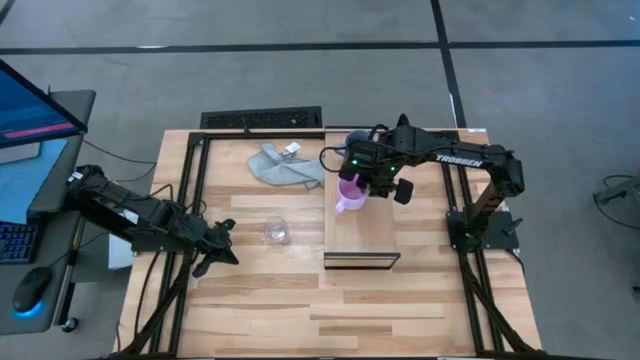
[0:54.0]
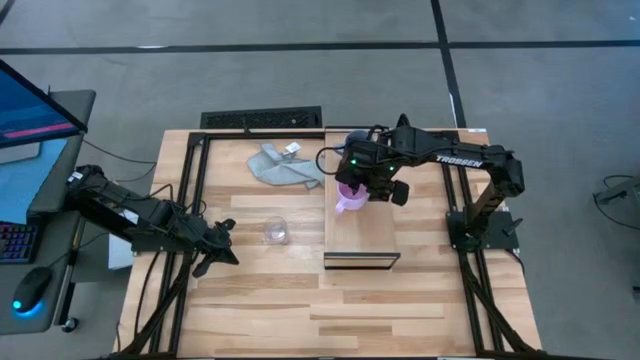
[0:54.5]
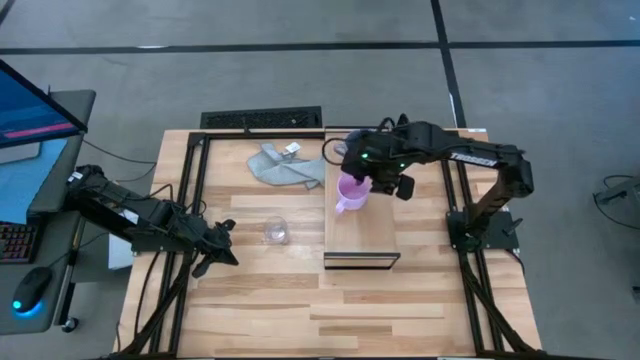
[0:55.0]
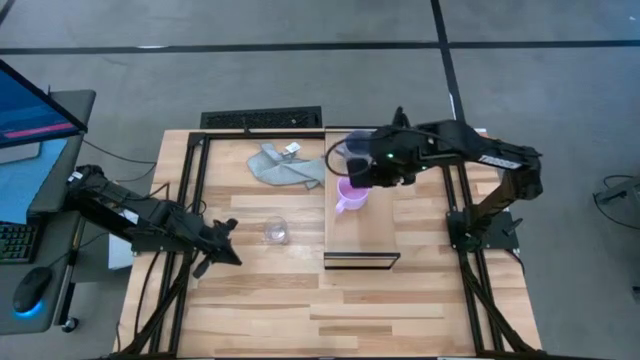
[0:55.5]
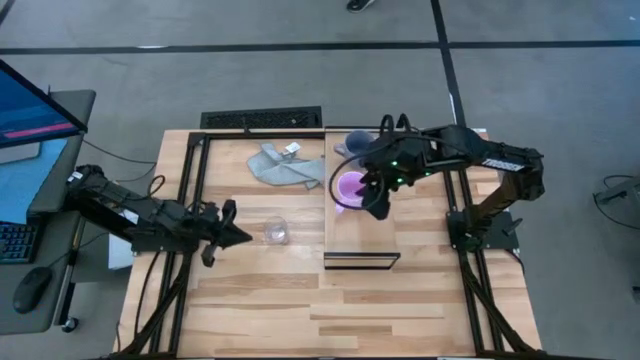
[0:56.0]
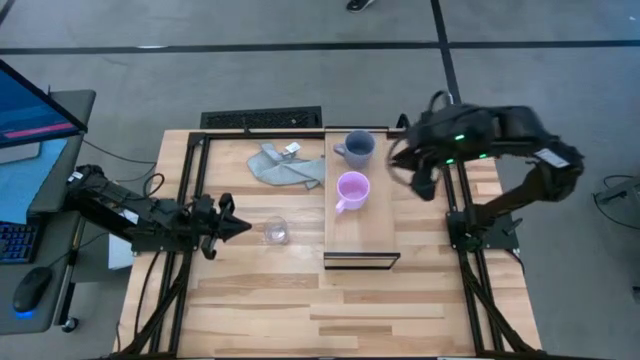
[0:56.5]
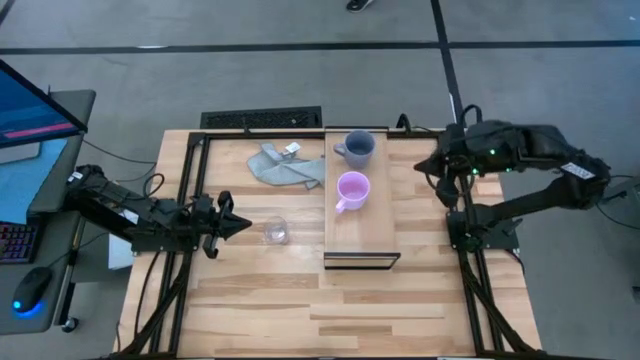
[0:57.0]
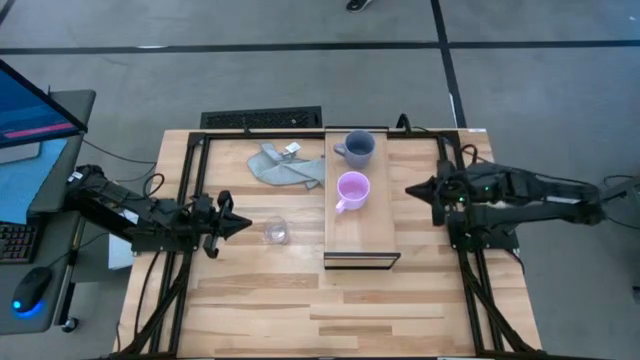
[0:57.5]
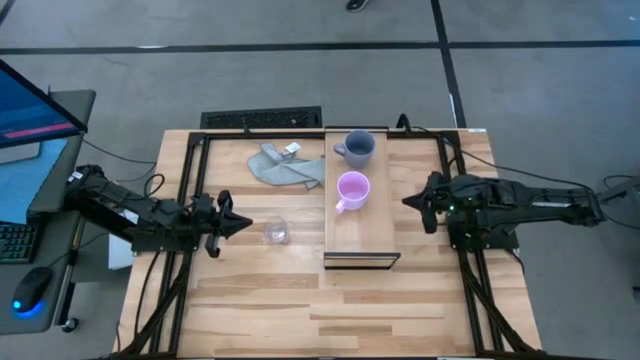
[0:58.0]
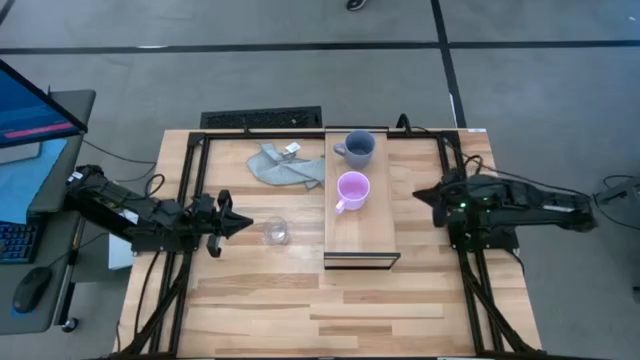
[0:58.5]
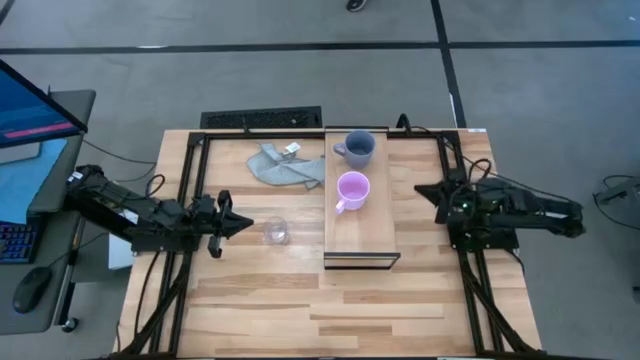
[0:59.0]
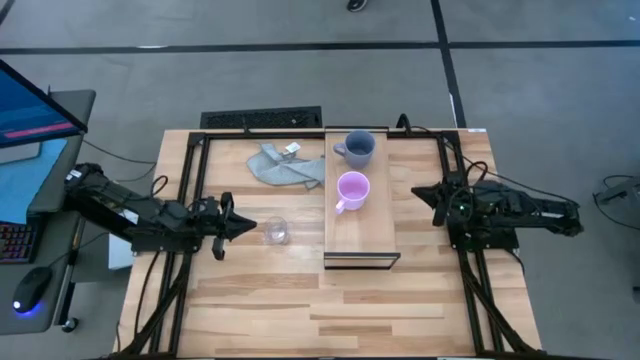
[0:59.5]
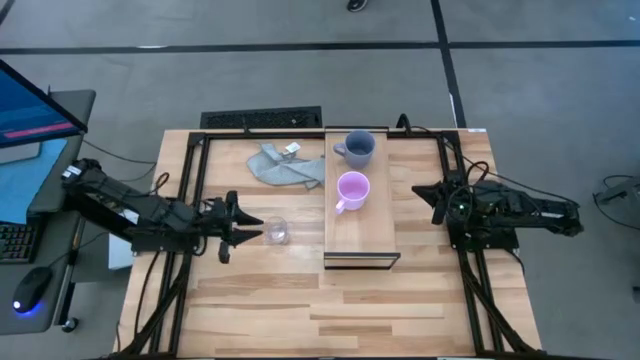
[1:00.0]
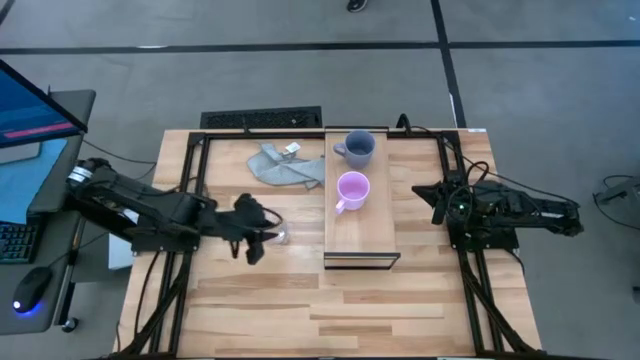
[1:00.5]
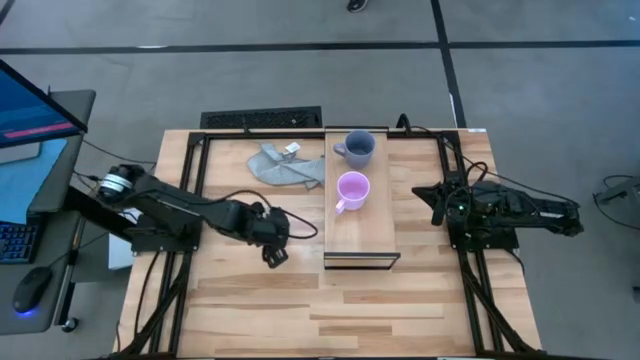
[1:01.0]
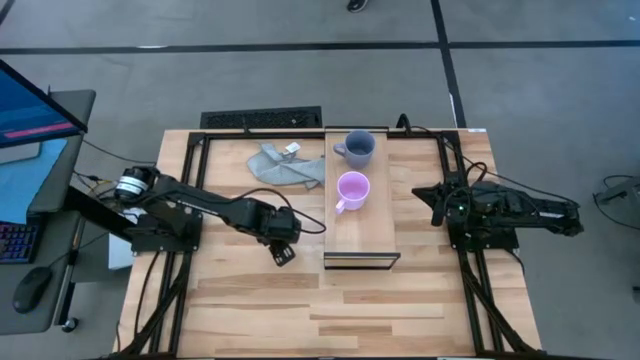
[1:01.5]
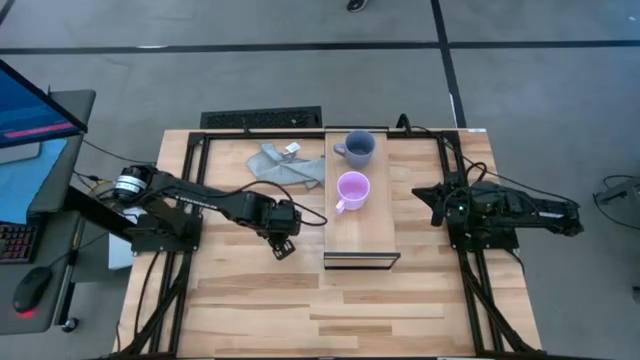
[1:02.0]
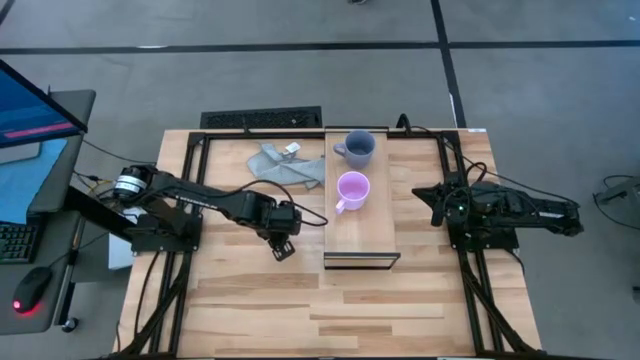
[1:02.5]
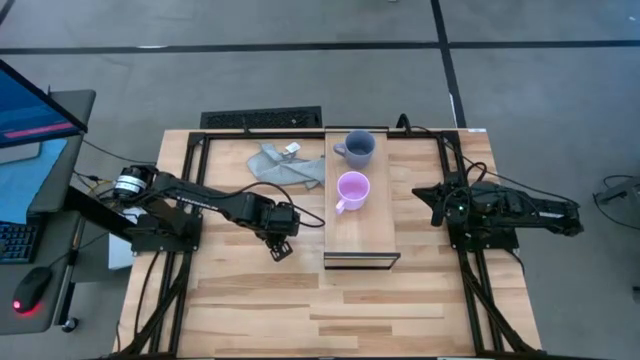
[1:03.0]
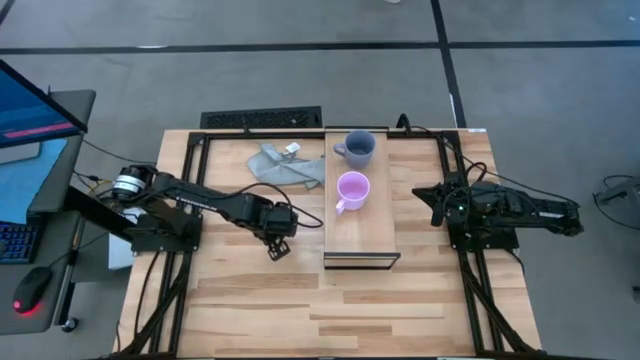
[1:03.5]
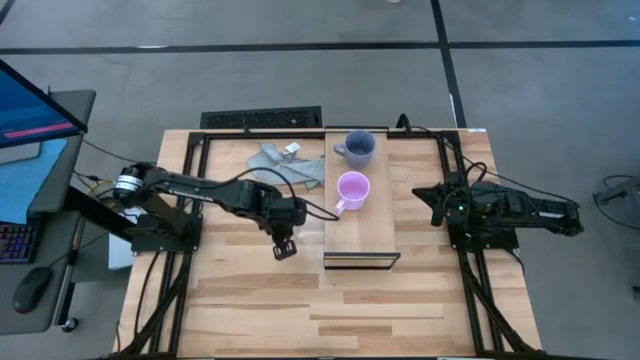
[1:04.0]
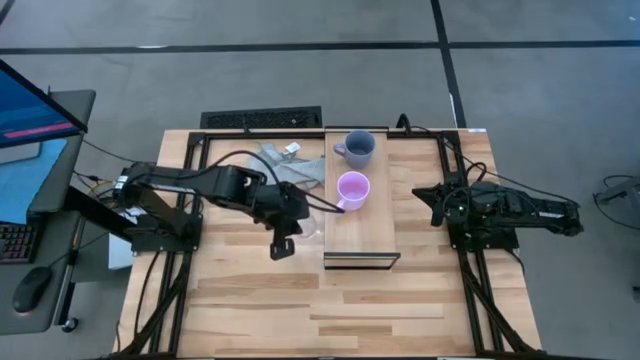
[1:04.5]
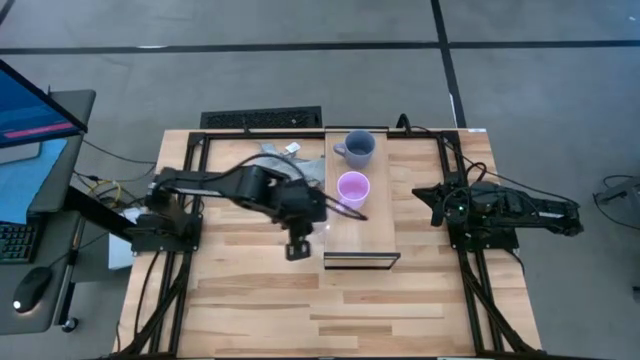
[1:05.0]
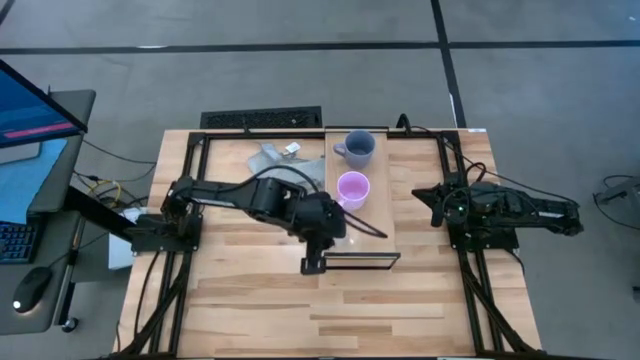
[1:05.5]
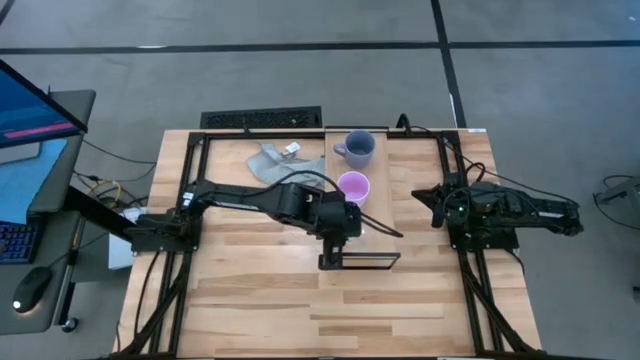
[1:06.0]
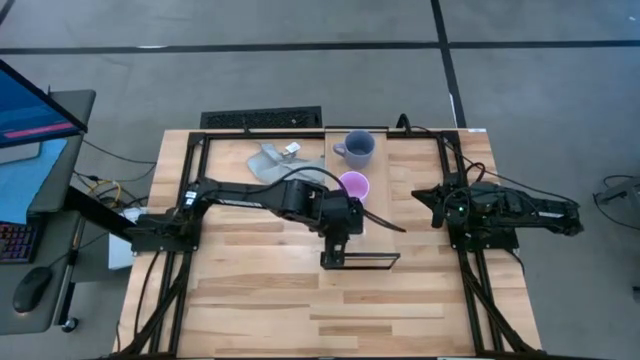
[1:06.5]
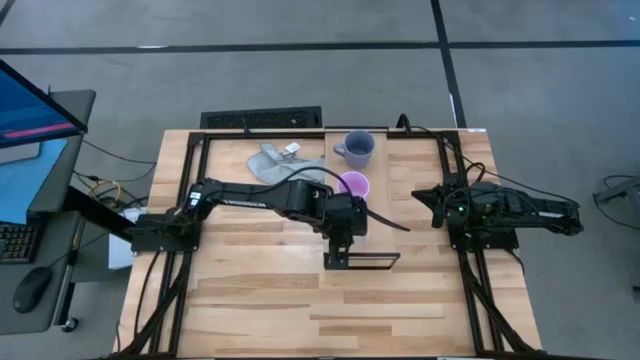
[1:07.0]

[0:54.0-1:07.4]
Task: Stack small to large cups/mugs on shelf
Put the transparent mug on the shelf

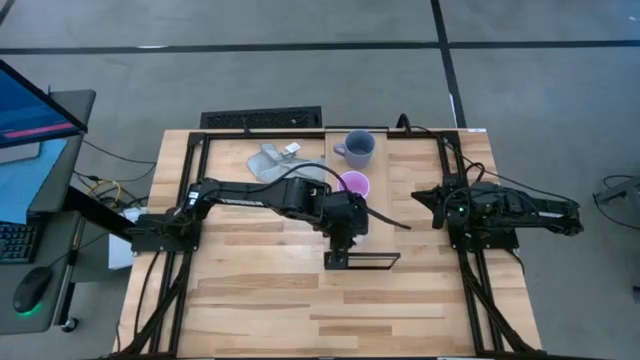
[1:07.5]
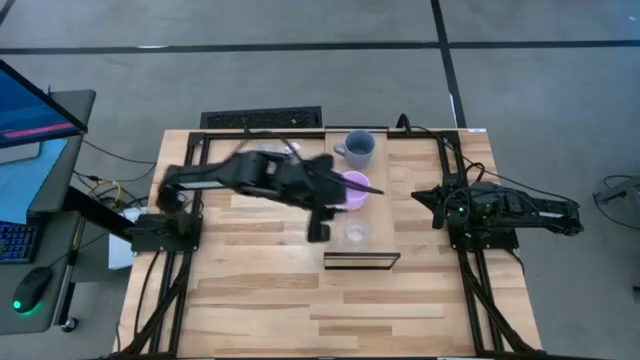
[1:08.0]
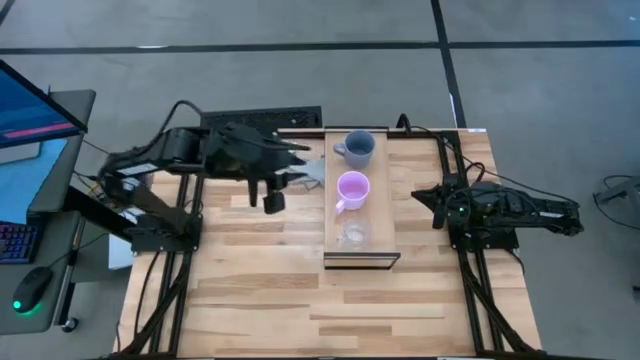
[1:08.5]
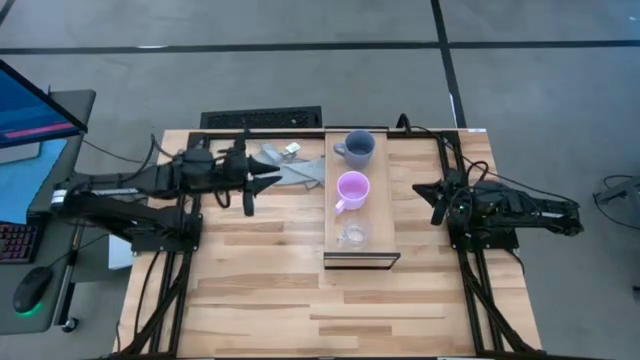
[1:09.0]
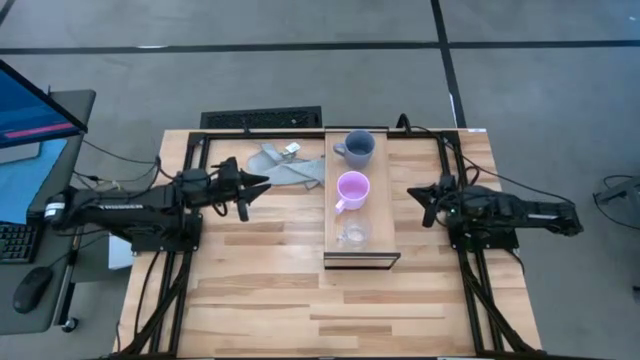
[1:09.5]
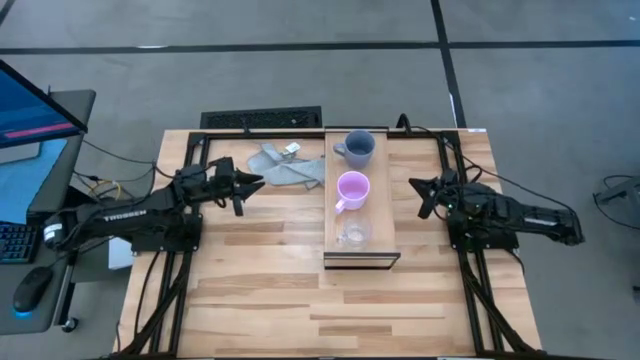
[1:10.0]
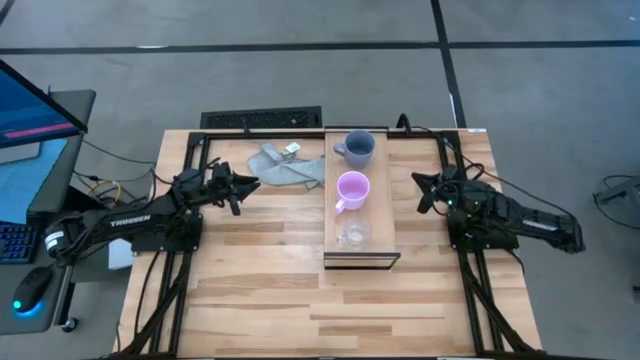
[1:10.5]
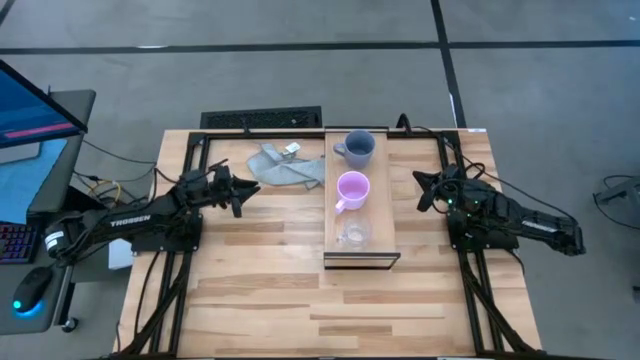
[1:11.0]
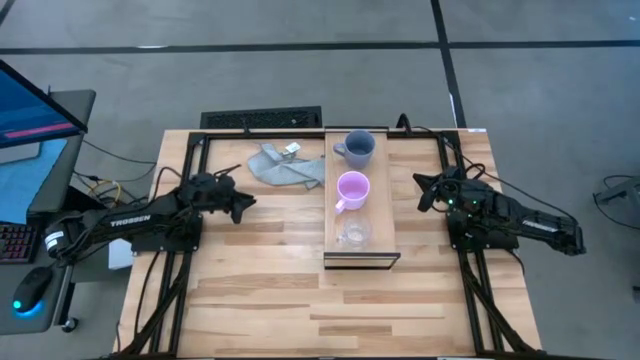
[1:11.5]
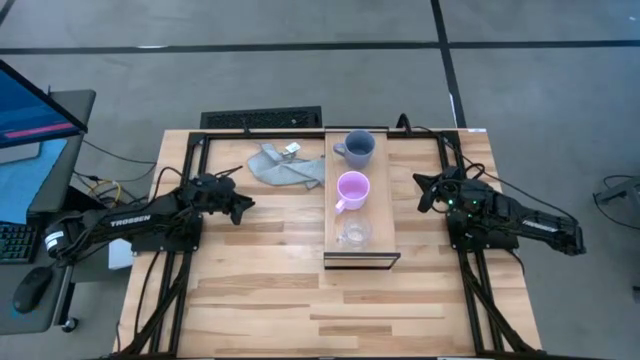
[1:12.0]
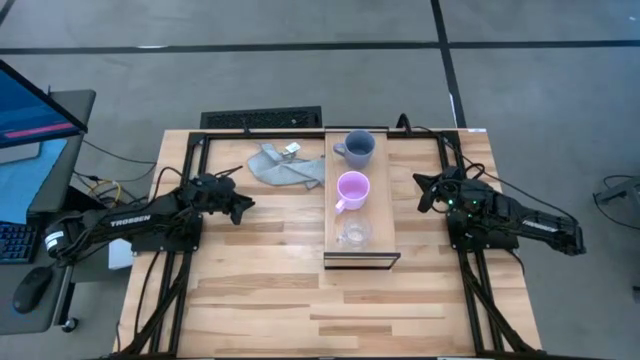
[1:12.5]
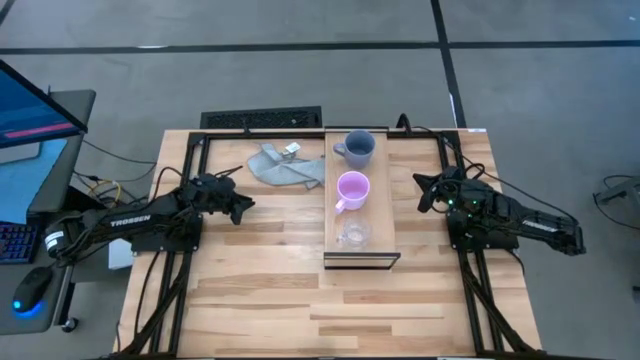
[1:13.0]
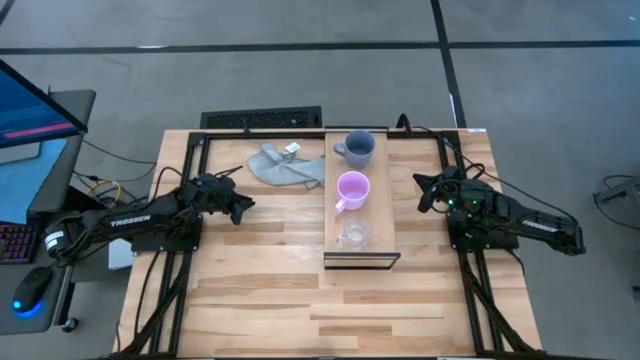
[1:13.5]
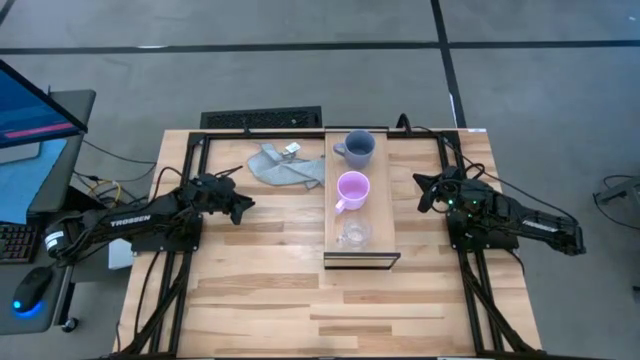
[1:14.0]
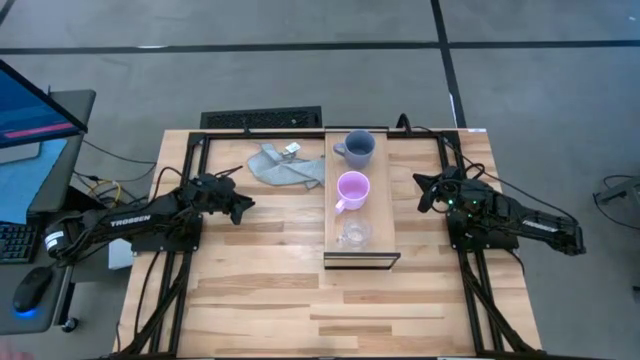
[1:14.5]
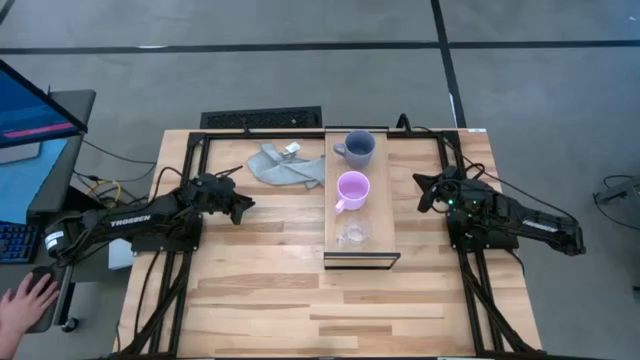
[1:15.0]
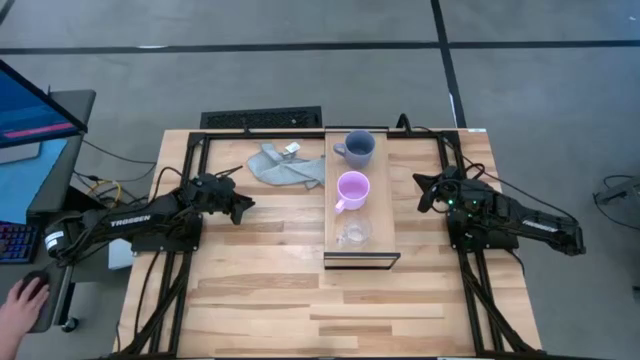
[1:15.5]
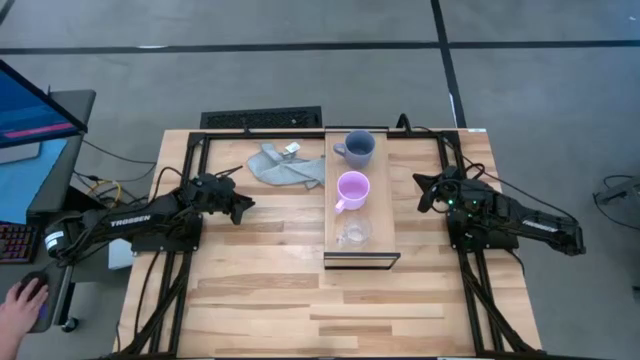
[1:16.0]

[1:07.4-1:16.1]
Return to Home Position
